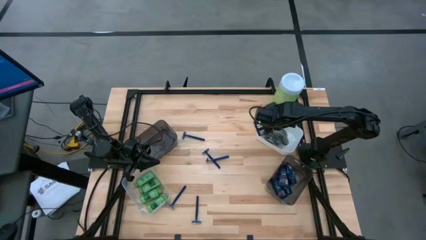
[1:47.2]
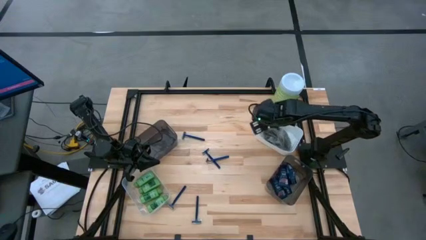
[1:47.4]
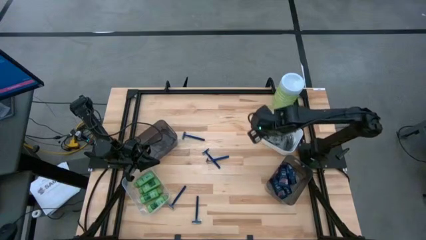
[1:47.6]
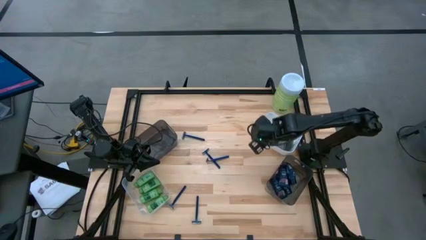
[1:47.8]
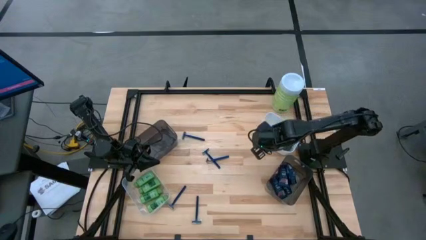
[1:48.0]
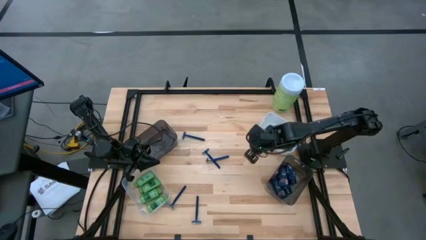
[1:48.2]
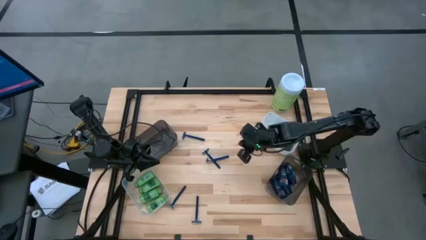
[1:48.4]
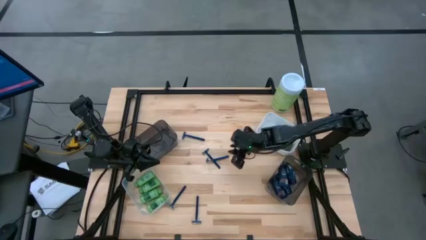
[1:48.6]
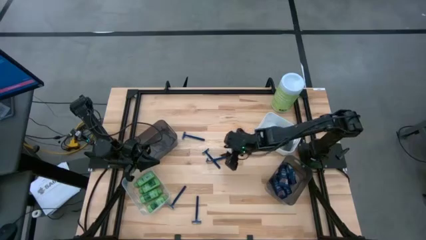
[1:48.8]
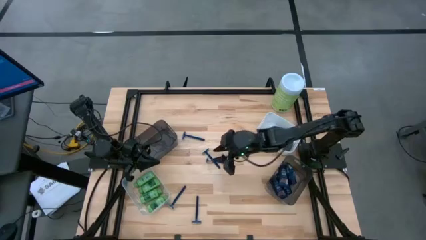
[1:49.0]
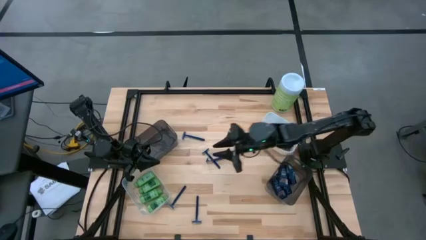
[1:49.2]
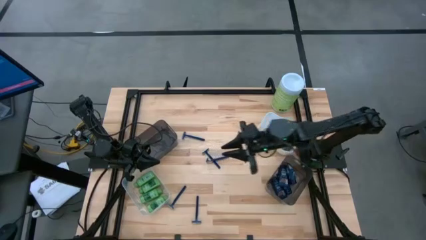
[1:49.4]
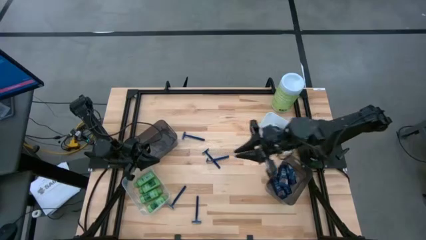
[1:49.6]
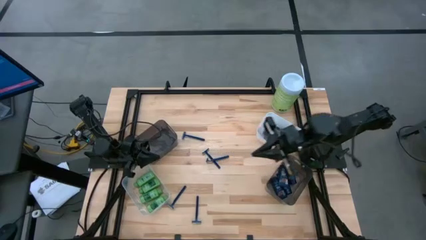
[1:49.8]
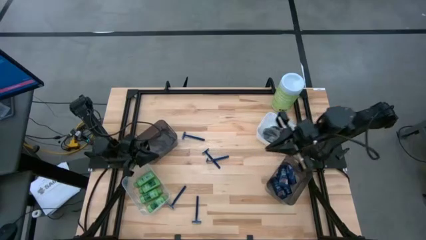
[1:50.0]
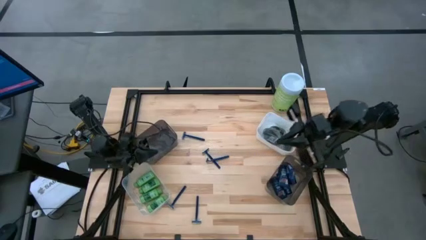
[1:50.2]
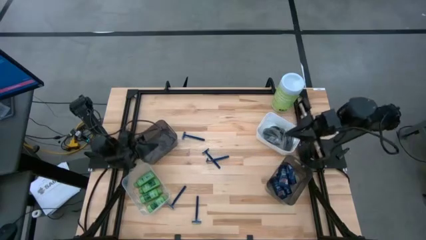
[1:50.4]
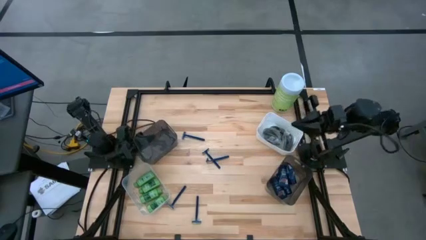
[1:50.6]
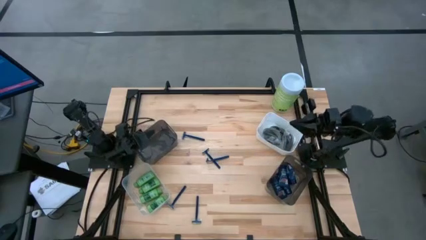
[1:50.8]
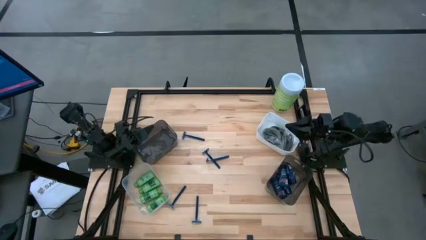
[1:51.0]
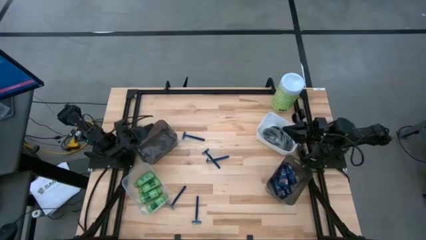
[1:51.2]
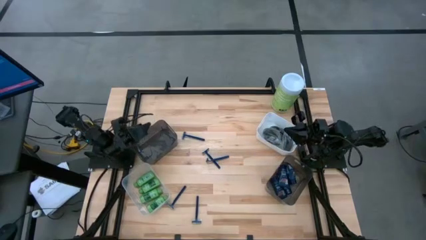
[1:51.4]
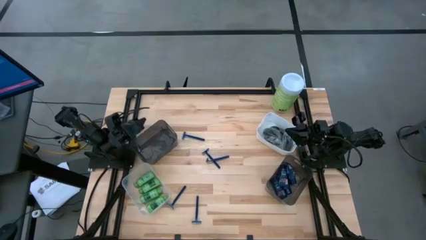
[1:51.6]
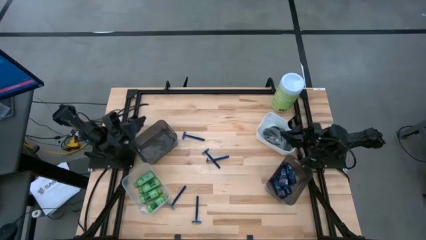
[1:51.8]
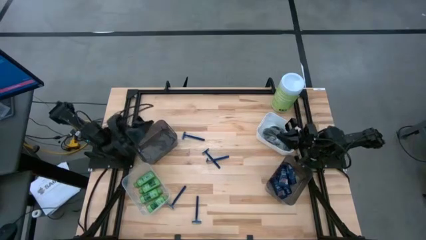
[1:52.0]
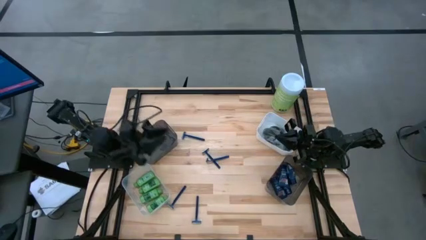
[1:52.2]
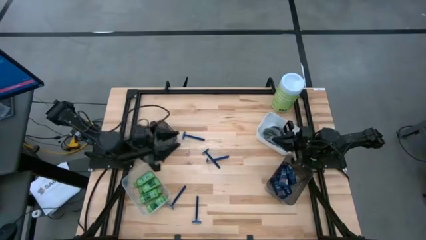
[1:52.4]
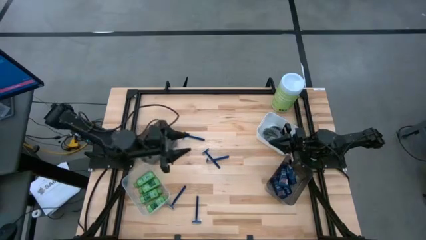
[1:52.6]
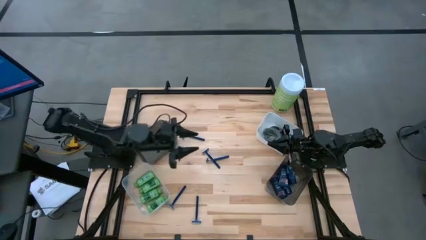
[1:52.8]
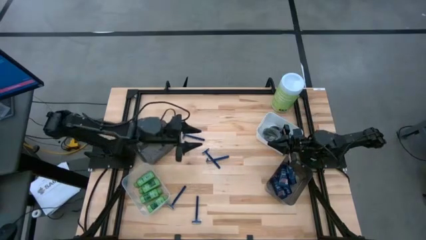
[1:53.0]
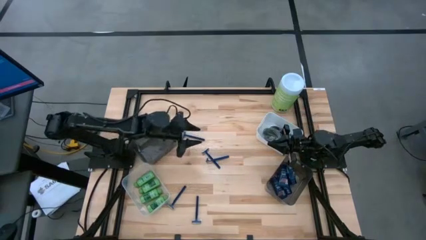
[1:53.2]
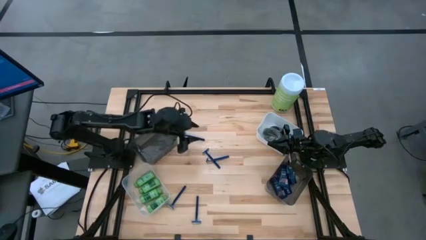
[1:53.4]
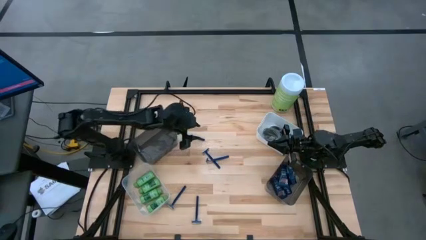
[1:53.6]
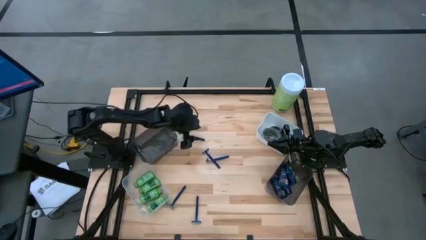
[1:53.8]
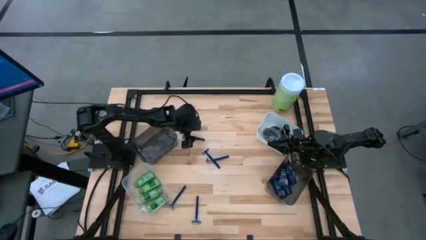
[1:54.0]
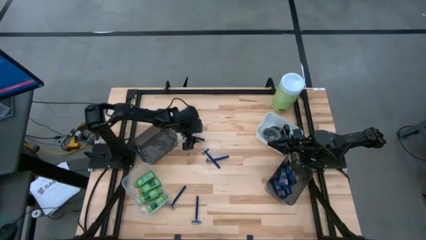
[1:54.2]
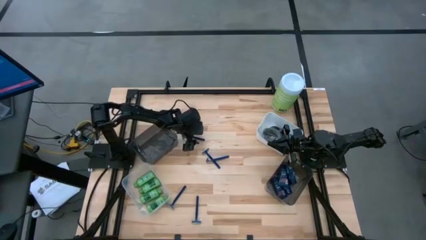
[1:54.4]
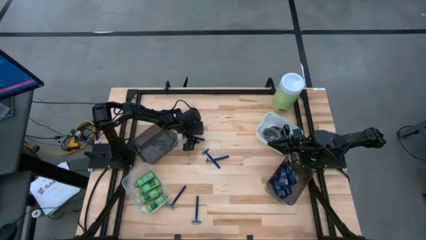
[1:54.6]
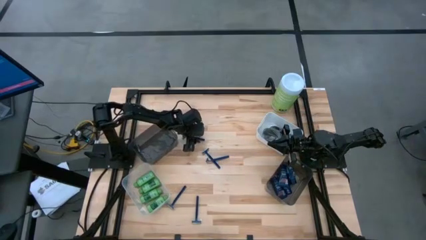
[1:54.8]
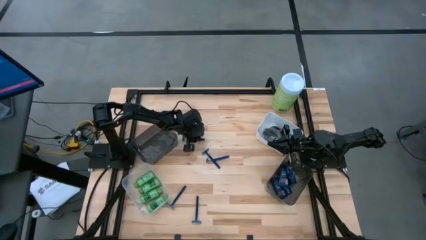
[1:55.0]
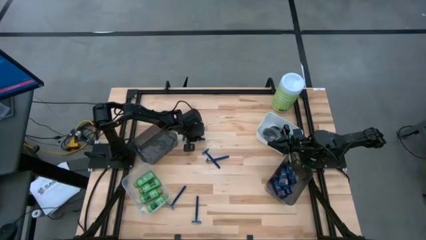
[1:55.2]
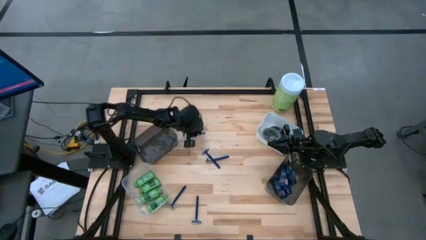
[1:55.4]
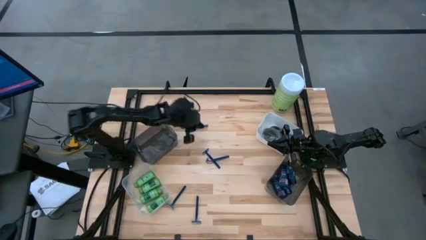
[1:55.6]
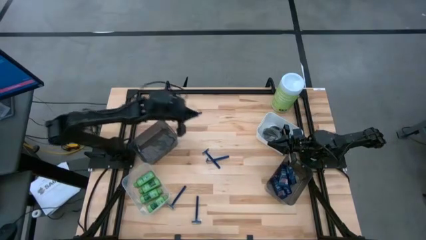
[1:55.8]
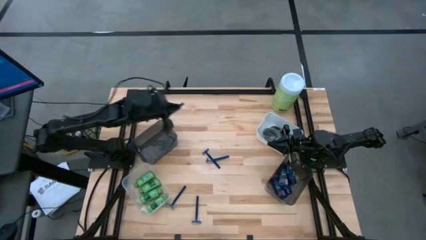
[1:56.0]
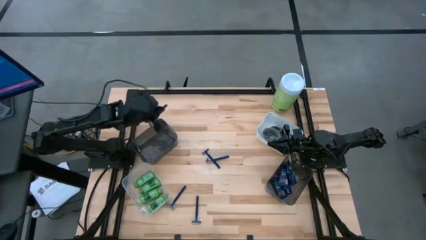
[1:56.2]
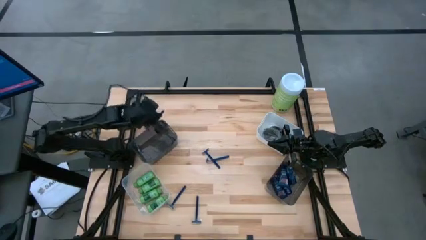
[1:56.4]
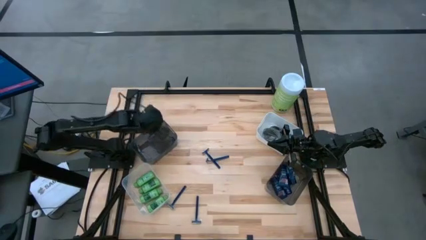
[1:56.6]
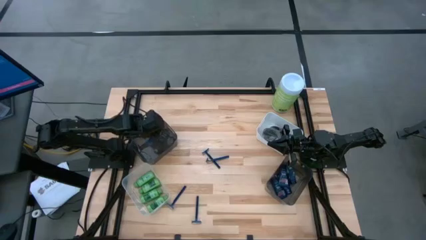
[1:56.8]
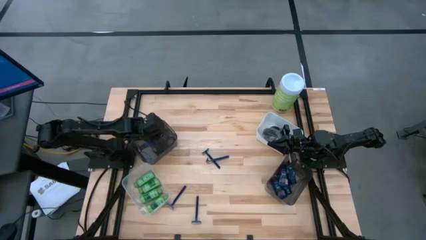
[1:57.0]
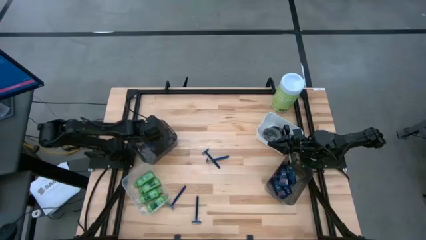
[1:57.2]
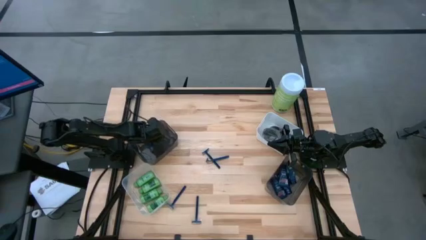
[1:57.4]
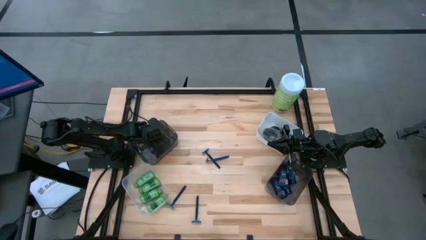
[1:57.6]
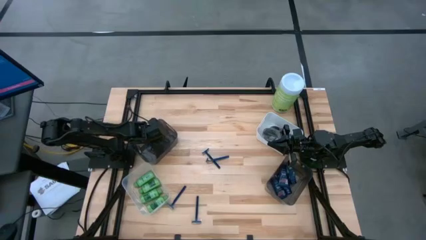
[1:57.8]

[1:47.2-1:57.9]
Task: Pick & Place Travel size toiletries
Put the blue razor into the left black bin

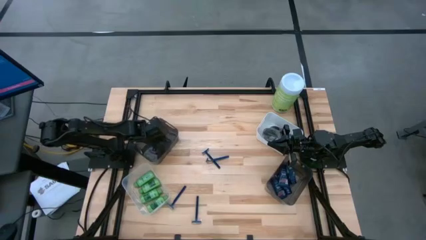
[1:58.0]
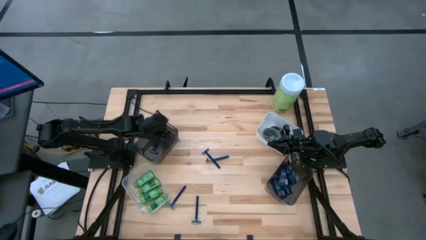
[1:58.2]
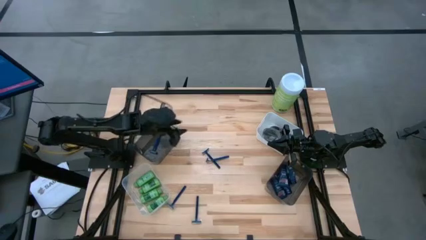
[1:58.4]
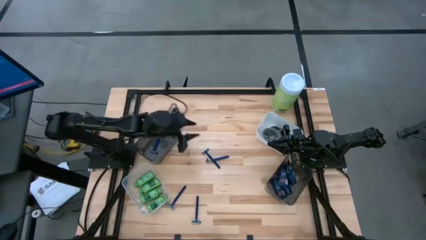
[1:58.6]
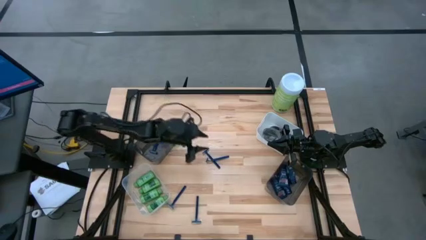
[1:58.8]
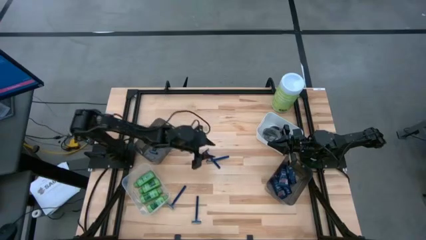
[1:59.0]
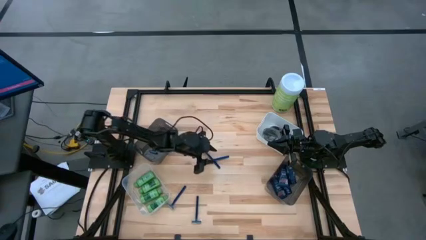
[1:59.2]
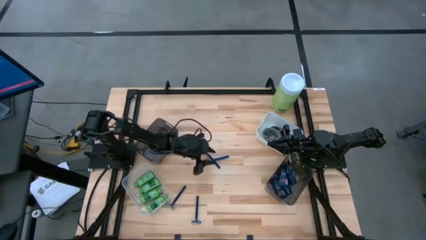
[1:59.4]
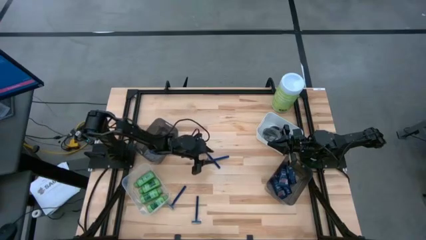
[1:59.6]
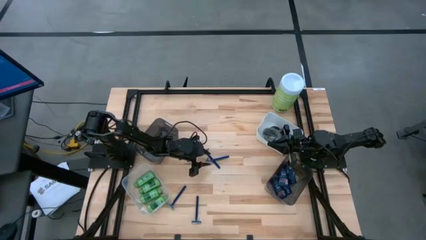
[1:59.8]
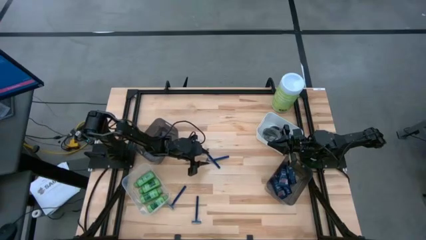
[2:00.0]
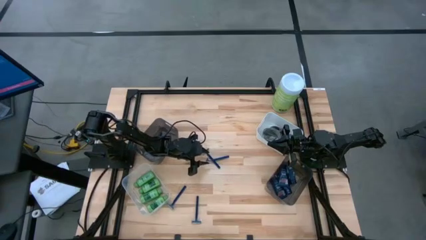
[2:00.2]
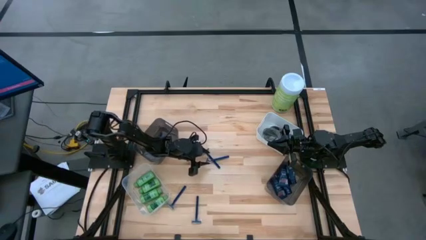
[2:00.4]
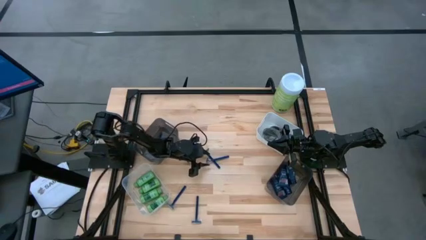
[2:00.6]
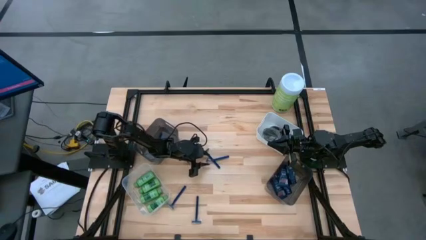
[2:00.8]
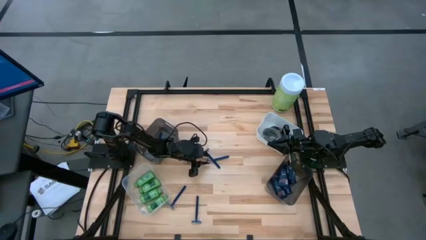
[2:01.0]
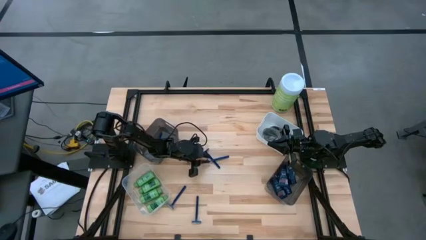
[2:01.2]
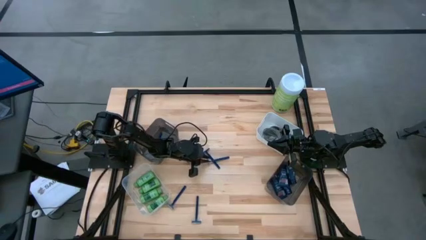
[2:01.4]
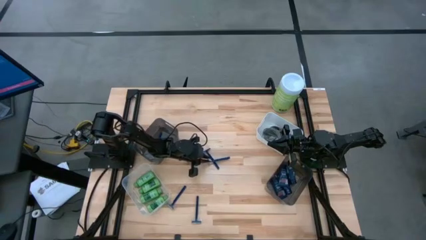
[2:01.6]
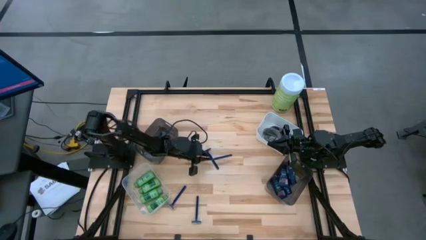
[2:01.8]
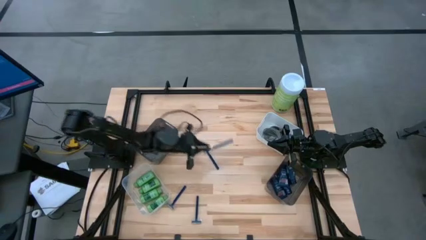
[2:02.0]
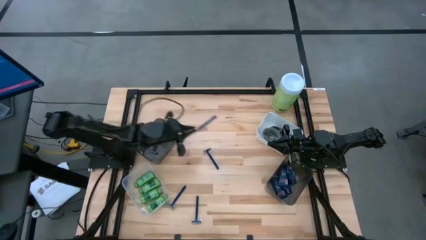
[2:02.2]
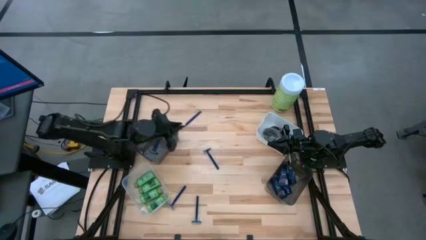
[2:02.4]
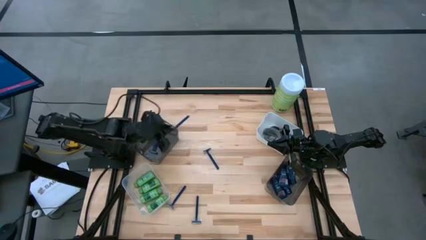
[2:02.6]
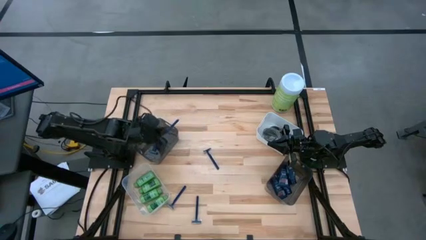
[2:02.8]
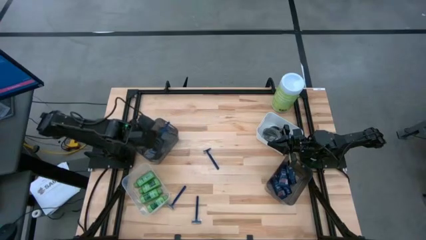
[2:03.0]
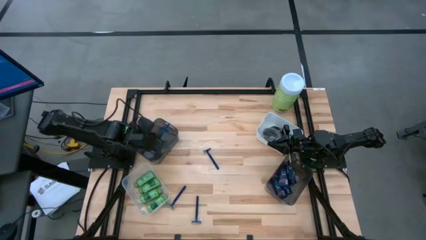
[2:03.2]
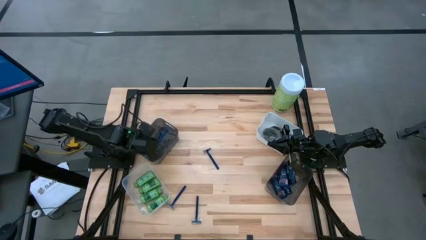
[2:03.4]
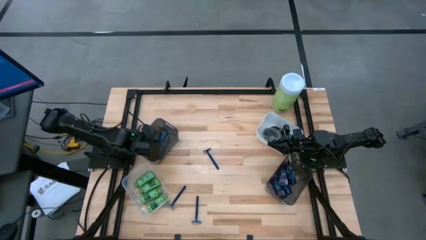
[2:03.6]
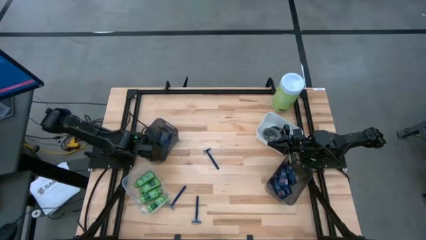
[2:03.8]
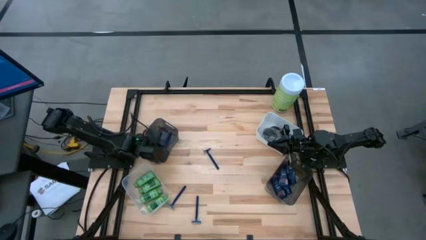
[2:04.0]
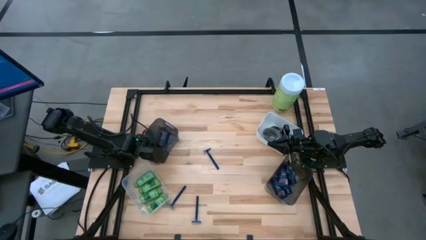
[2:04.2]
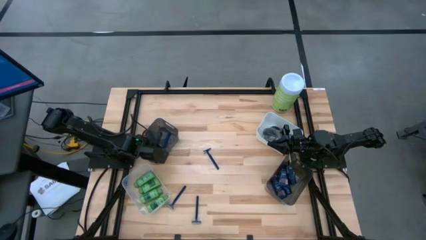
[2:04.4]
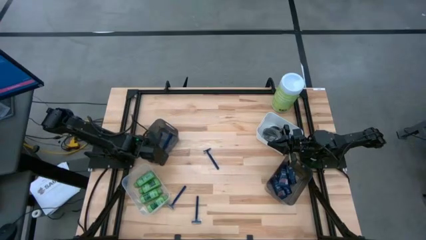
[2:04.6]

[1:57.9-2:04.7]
Put the blue razor into the left black bin
